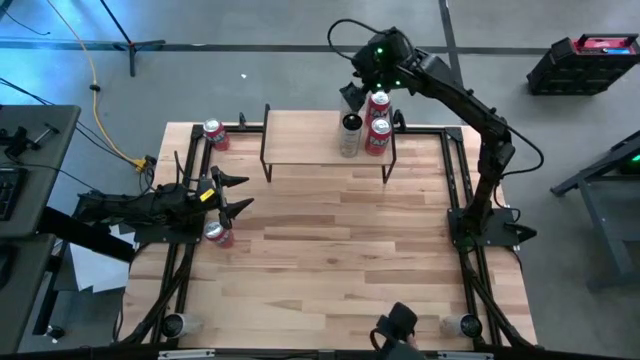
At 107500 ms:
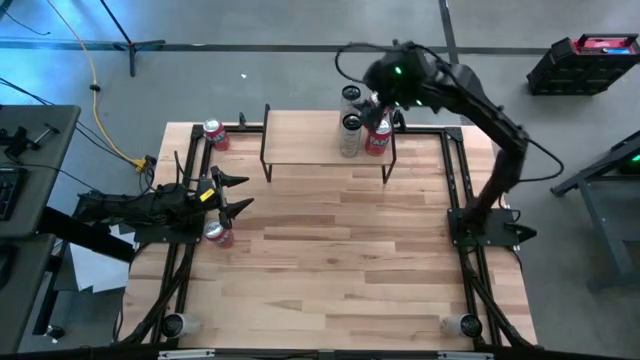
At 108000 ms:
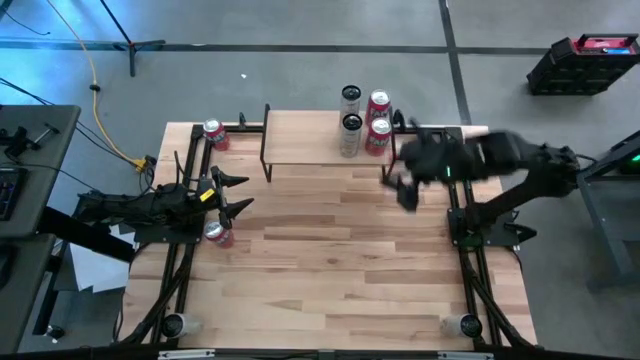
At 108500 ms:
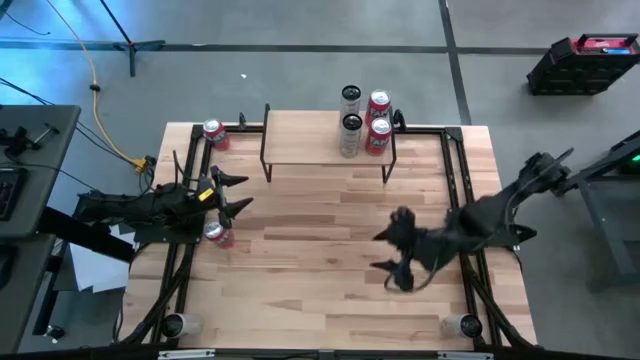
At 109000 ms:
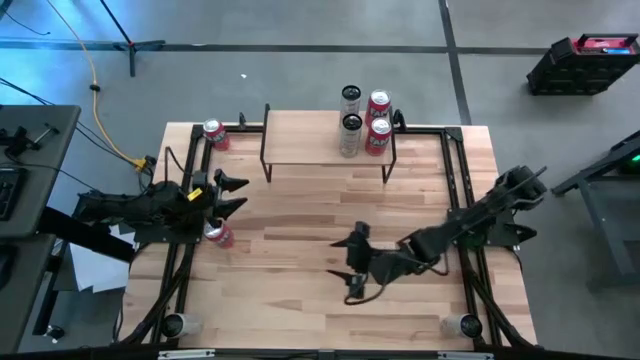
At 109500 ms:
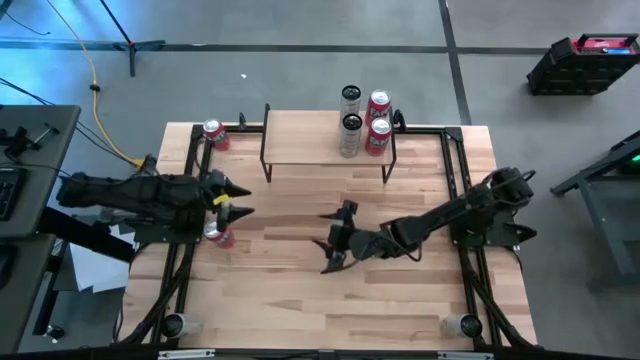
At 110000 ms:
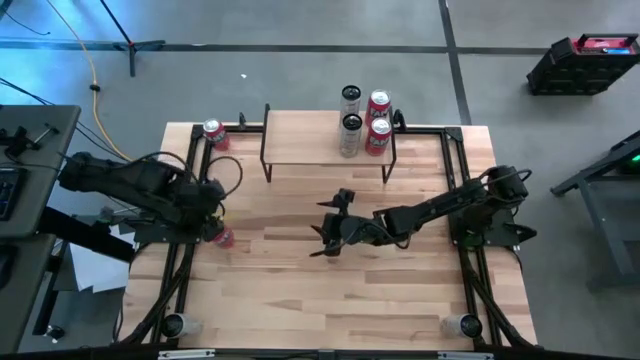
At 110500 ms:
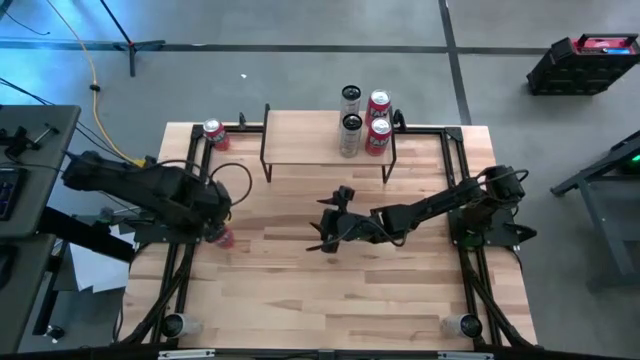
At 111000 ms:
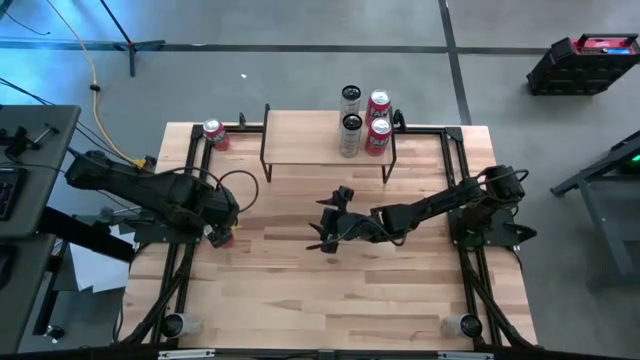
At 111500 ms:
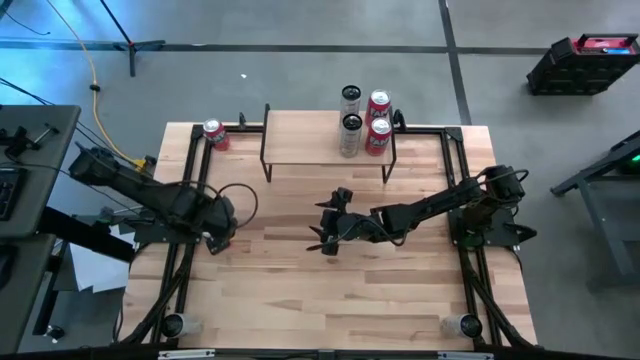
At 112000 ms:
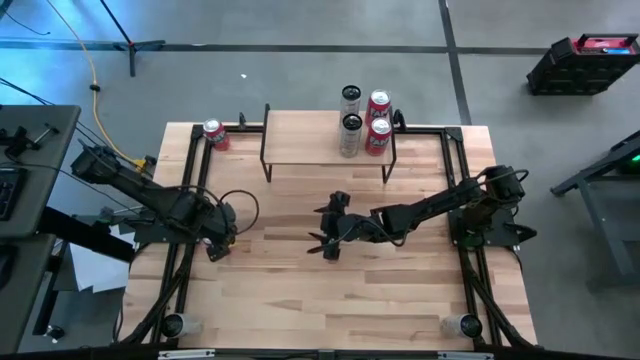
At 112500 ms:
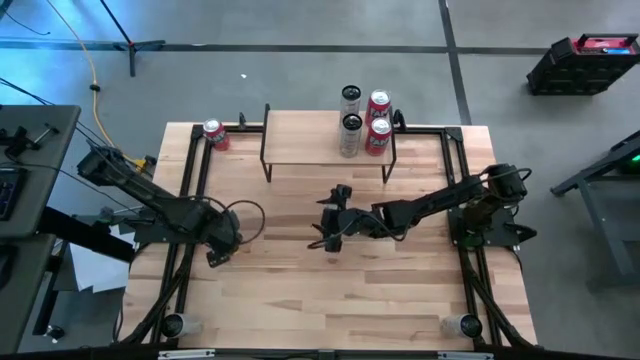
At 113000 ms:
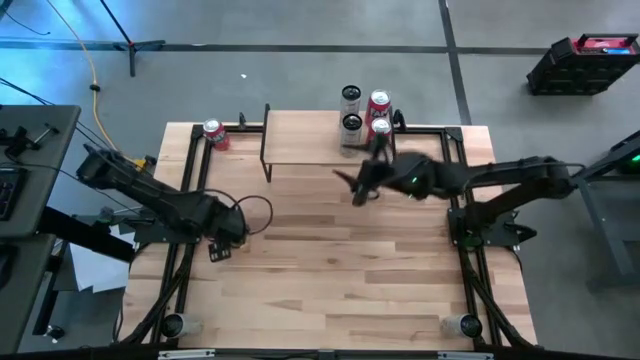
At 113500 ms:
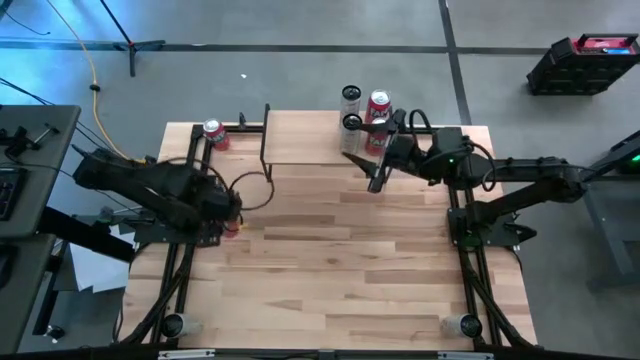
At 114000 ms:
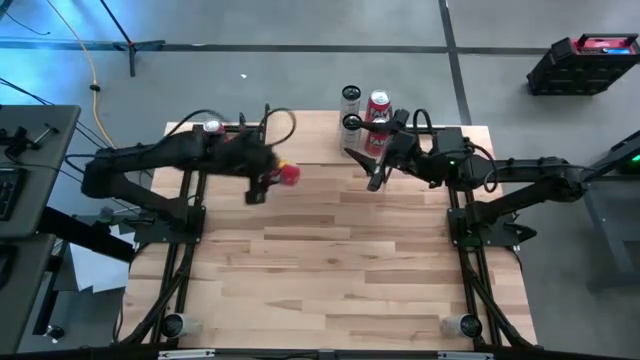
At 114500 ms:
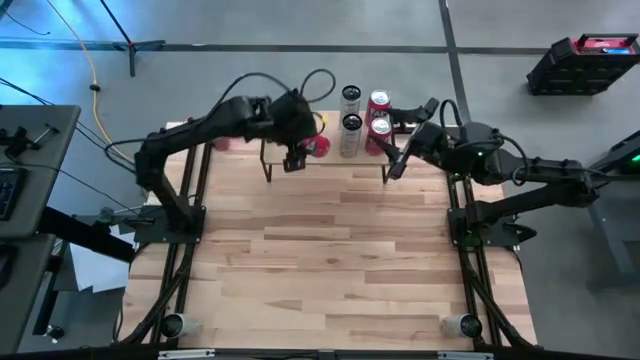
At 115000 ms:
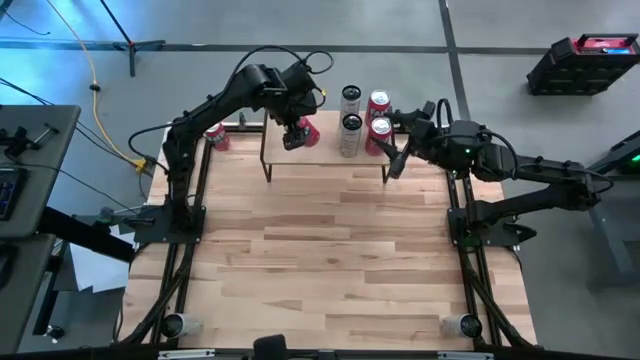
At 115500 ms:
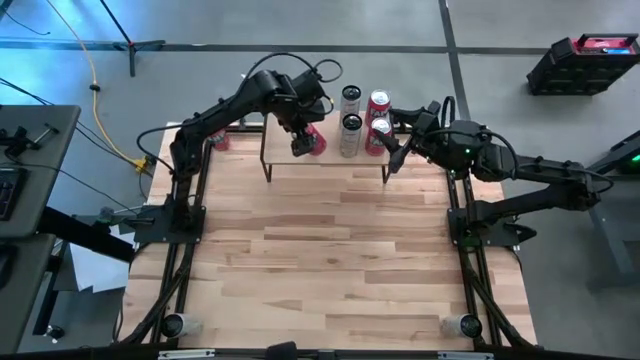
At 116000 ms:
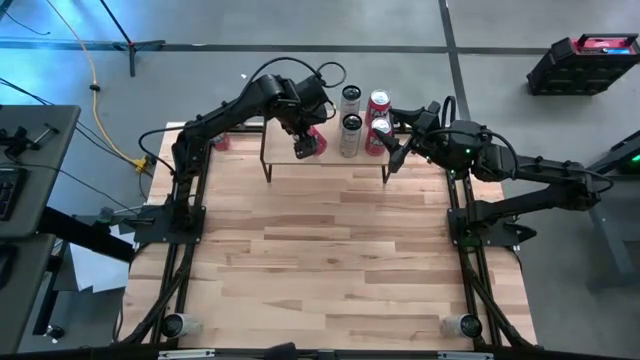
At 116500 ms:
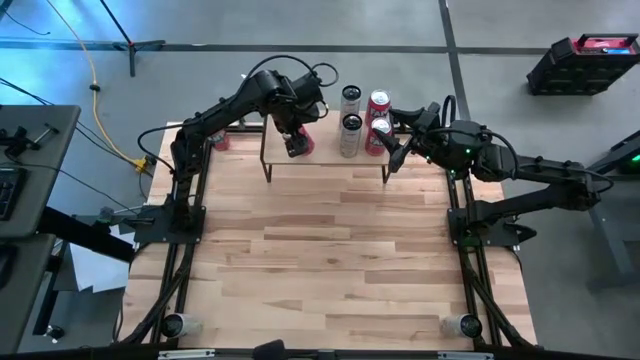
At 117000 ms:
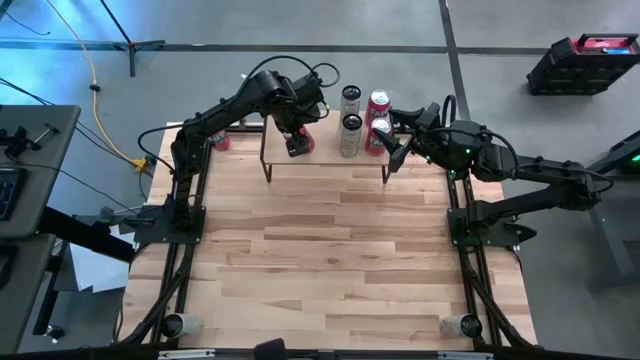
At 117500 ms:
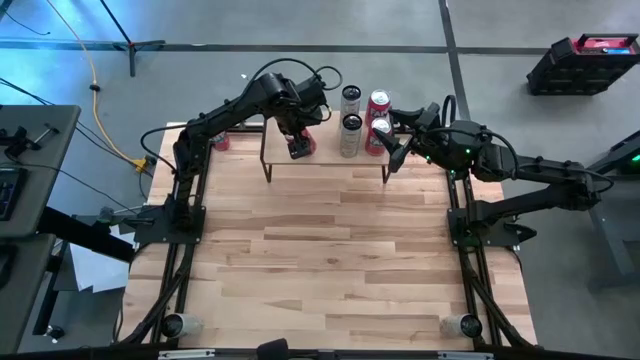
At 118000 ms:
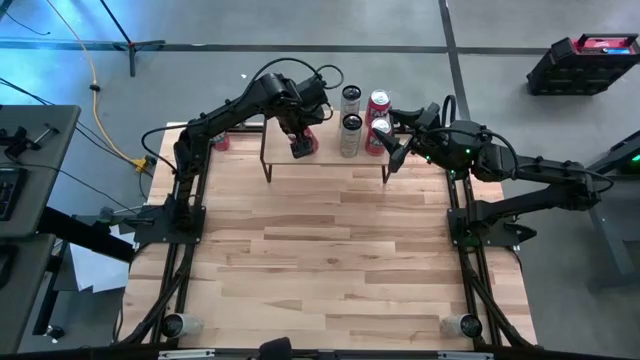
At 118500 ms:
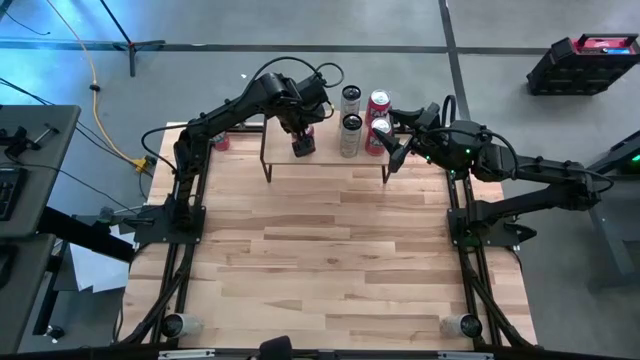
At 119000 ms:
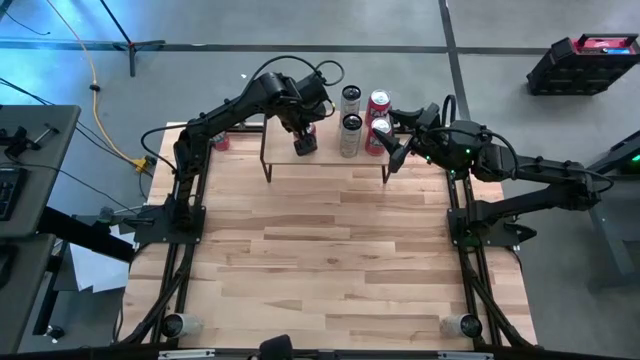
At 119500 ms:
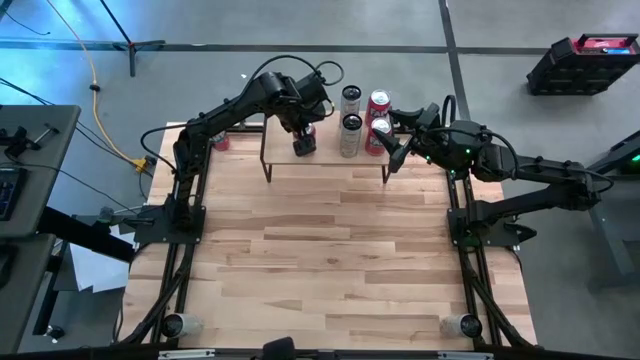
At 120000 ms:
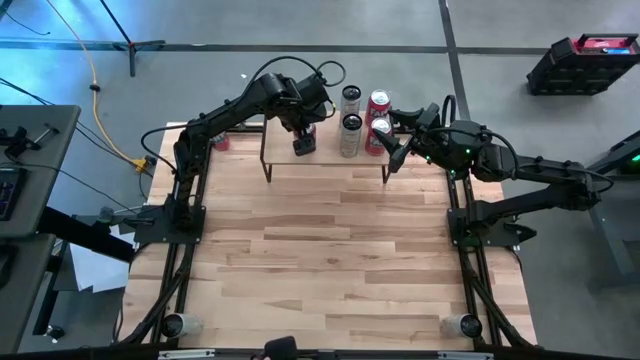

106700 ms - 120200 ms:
Task: Place canned beverage on shelf
Put the bottom red soda can on the shelf

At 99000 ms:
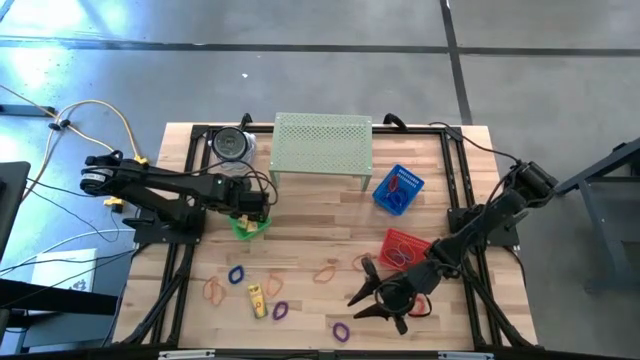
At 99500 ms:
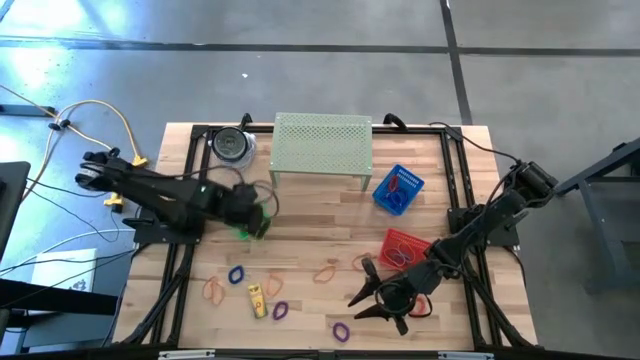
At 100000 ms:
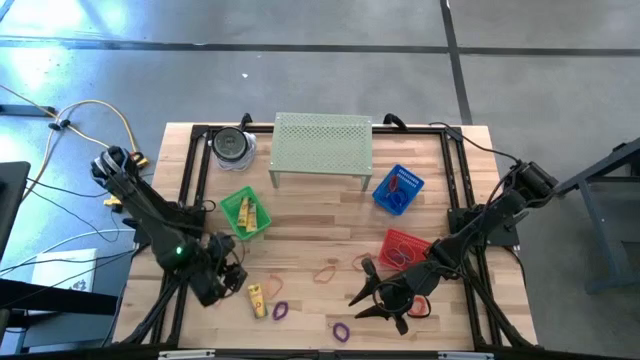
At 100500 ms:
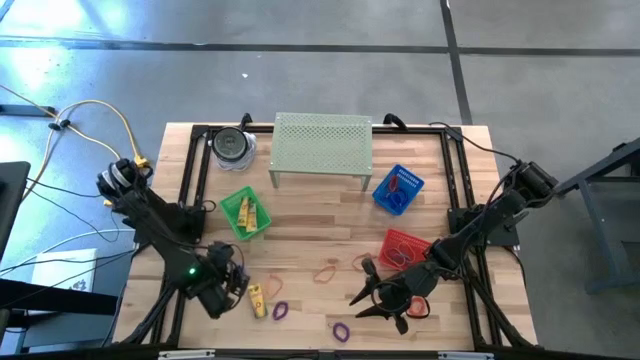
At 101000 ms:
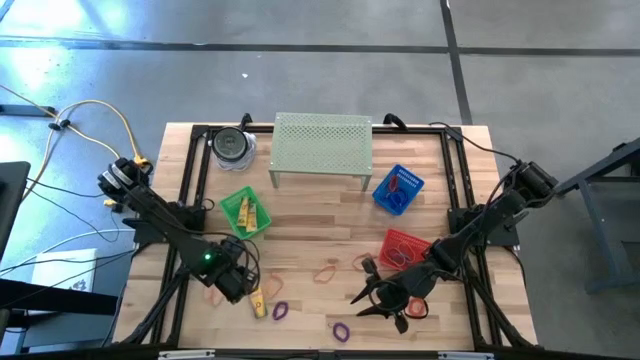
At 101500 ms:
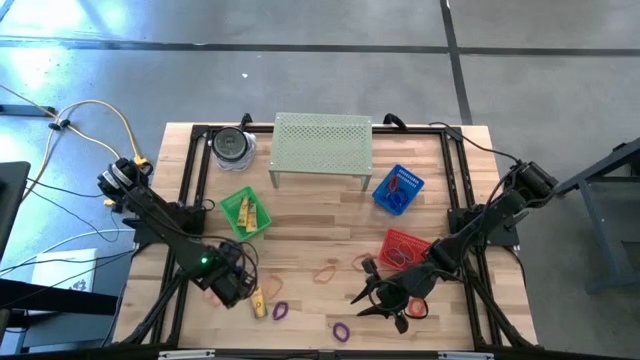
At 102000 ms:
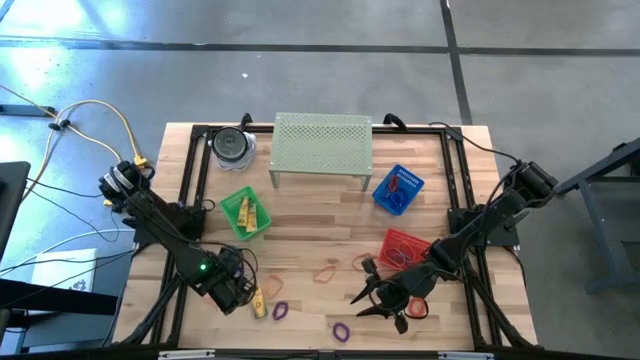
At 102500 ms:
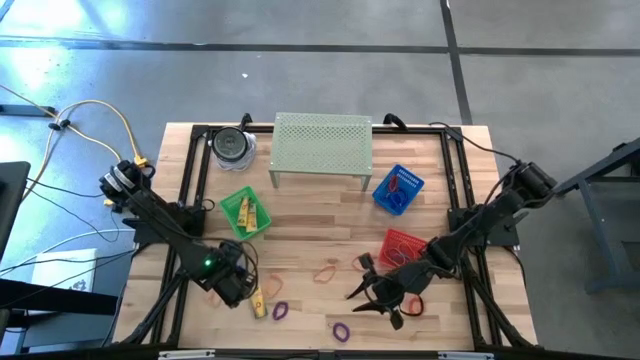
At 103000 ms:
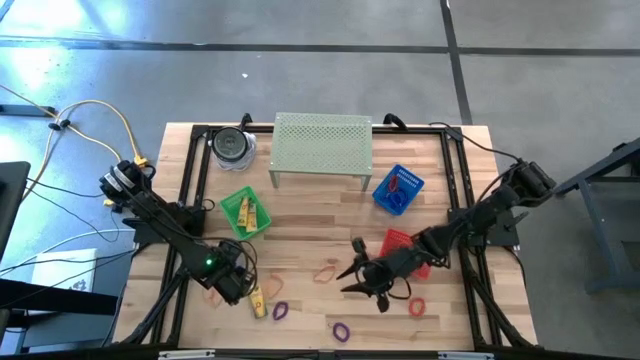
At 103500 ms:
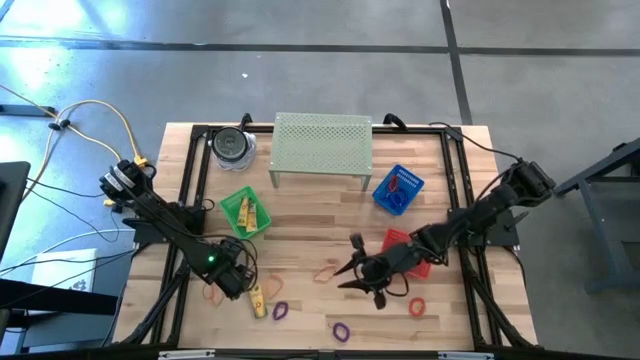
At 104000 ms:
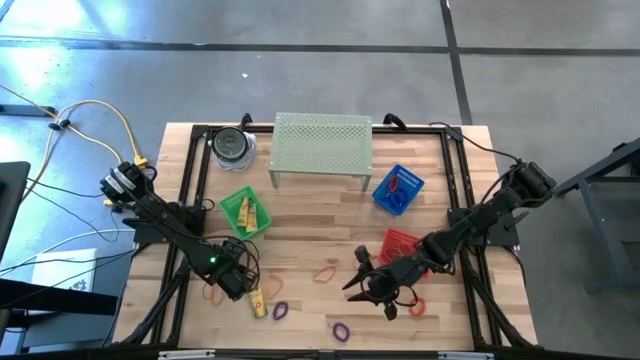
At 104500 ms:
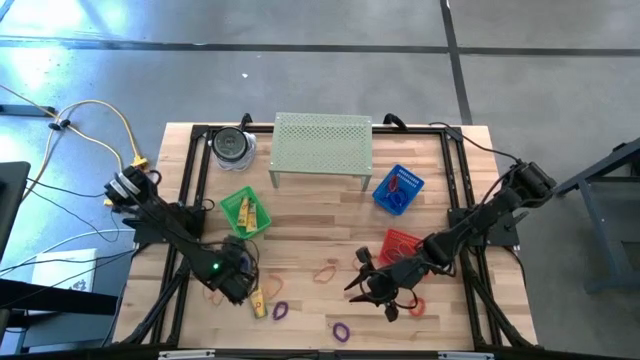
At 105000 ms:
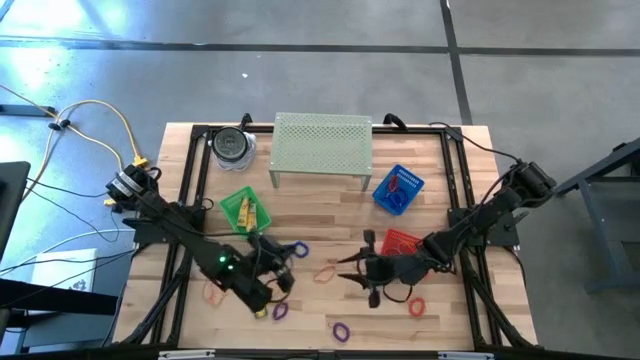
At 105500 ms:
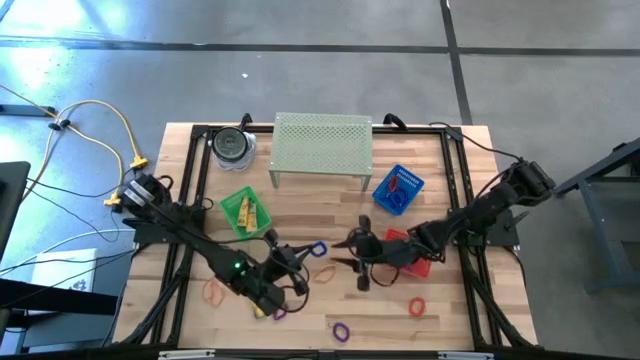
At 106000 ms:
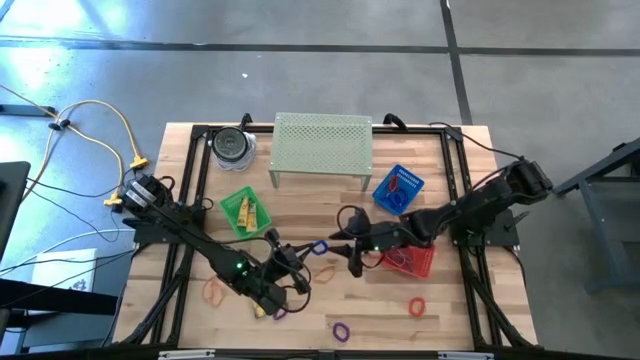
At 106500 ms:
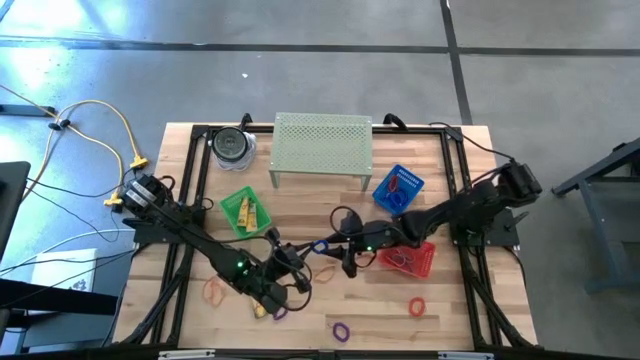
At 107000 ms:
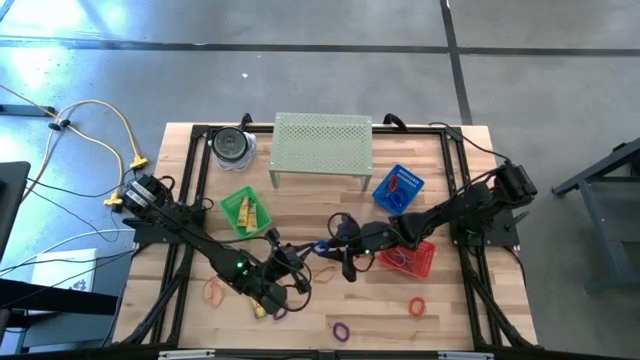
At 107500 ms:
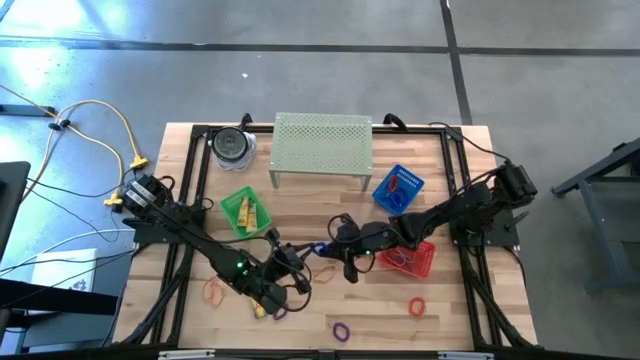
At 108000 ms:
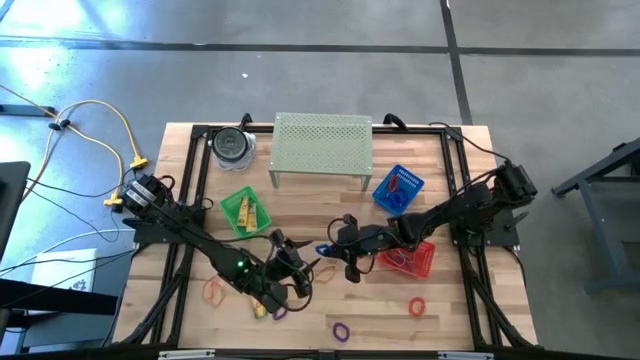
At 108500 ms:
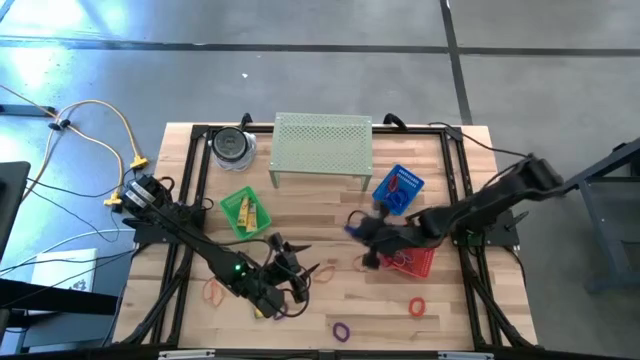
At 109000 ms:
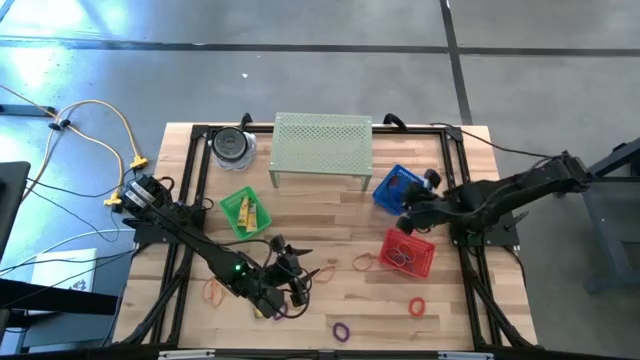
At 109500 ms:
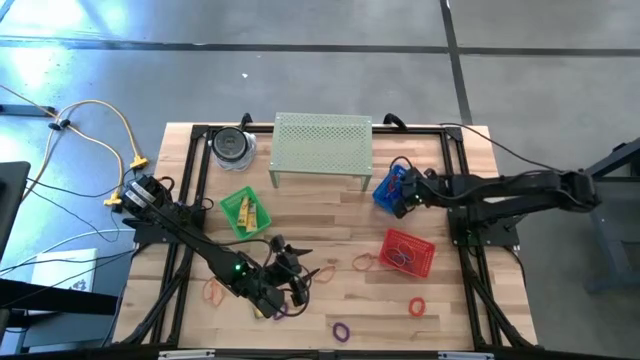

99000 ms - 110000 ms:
Task: Pick & Place Office Desk Supplies
Put the blue spring keychain into the blue basket
